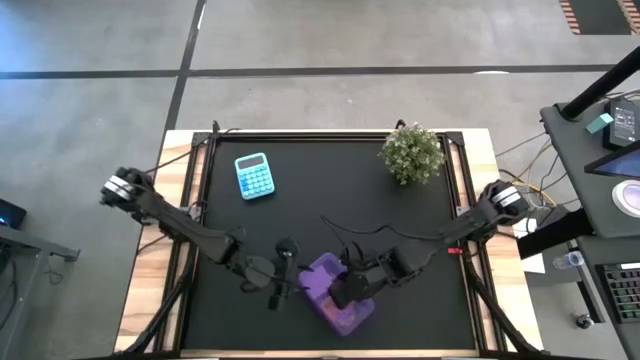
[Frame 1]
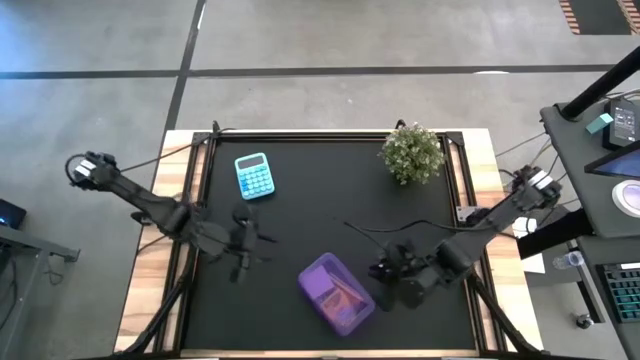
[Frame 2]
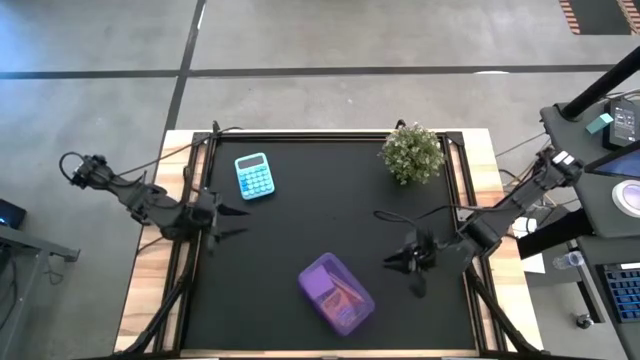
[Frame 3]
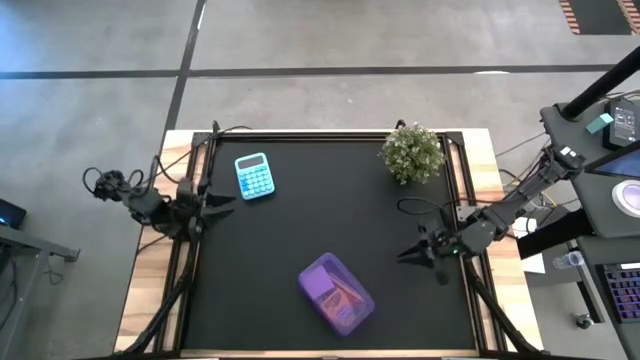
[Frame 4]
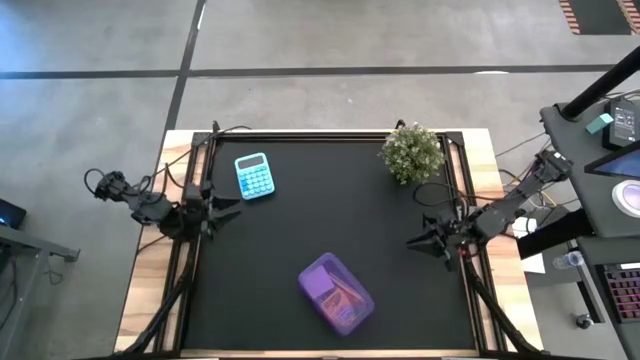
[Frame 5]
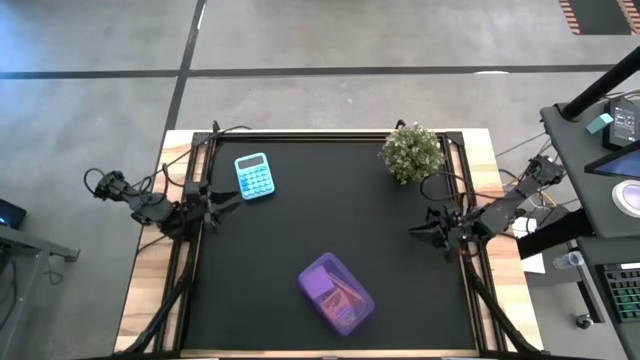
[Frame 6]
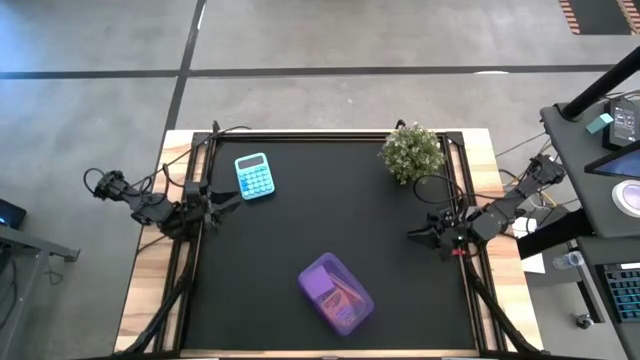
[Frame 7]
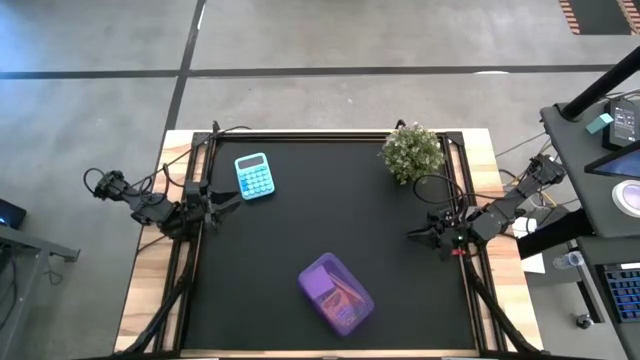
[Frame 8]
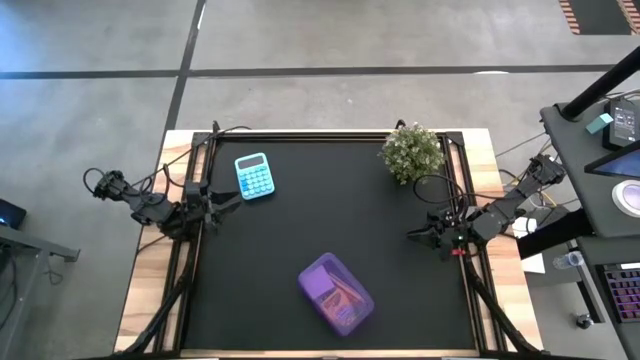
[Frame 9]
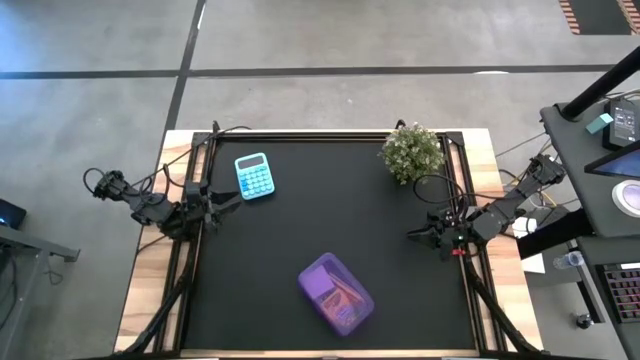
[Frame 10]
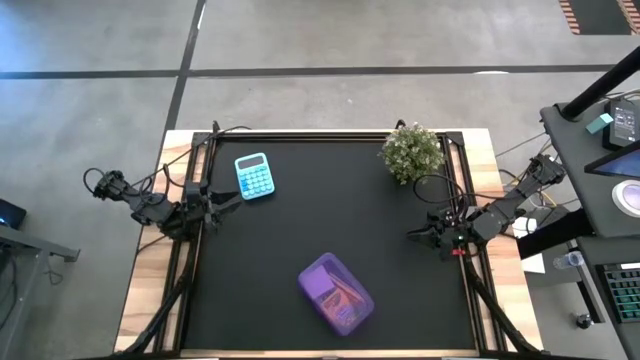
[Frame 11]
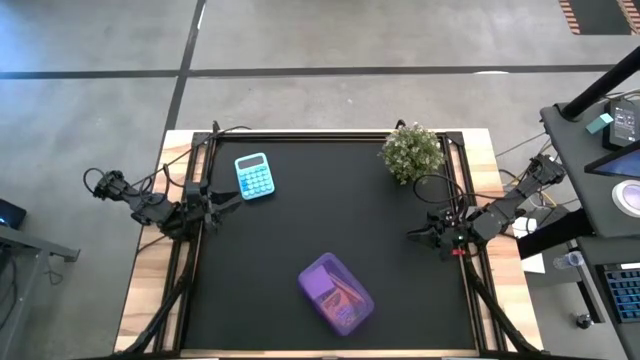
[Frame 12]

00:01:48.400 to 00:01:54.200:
Task: Pack school essentials
Return to Home Position

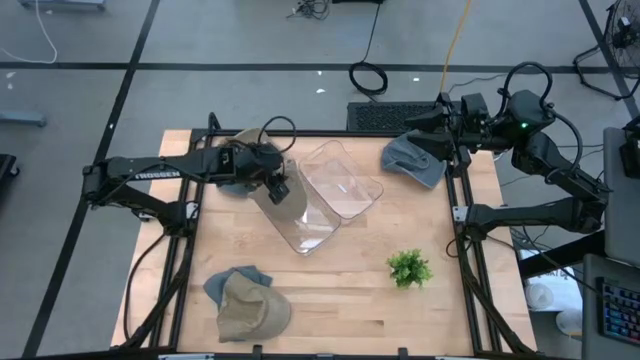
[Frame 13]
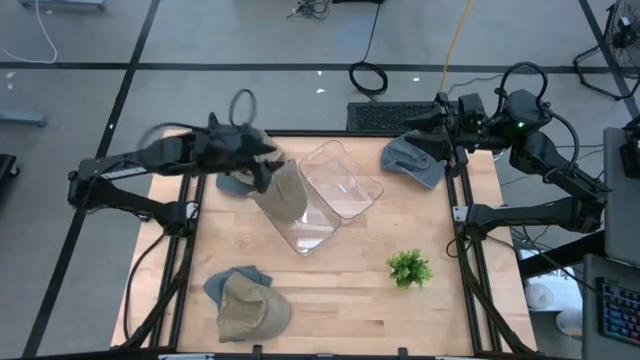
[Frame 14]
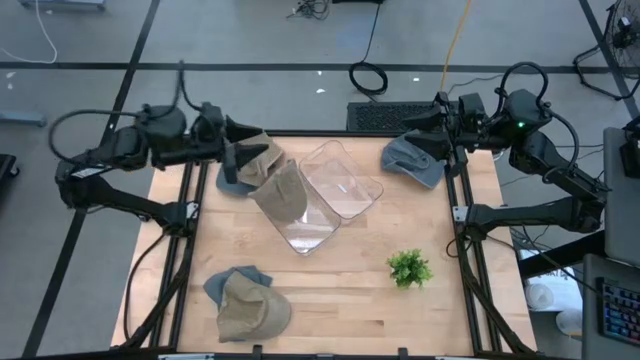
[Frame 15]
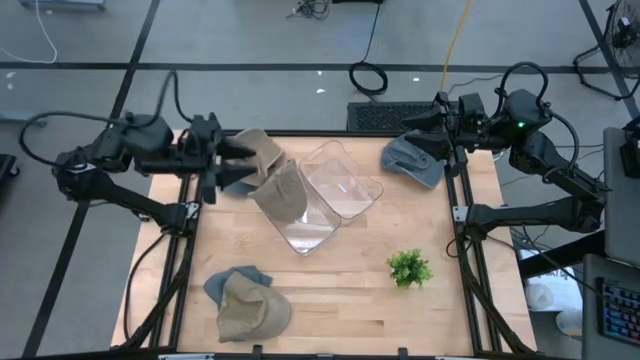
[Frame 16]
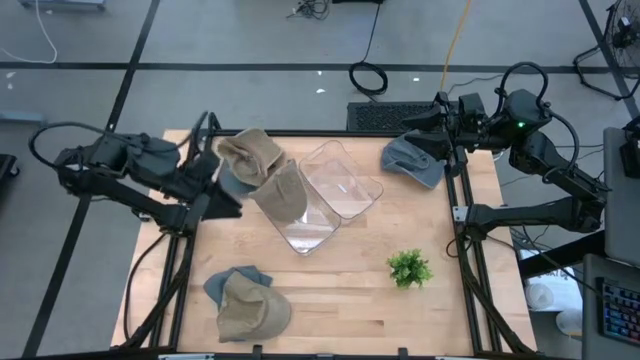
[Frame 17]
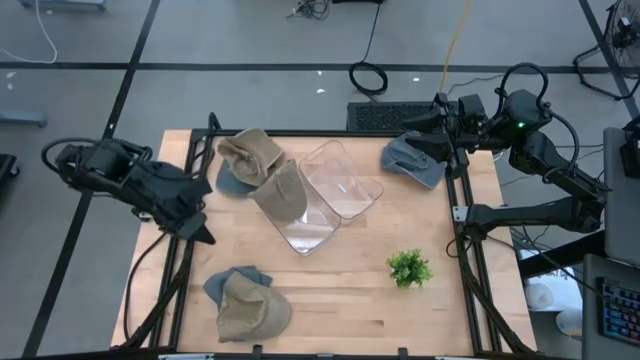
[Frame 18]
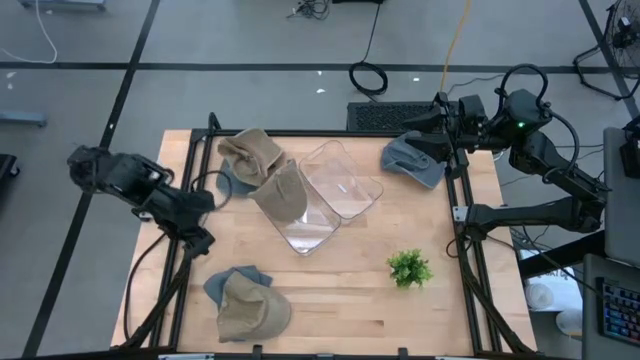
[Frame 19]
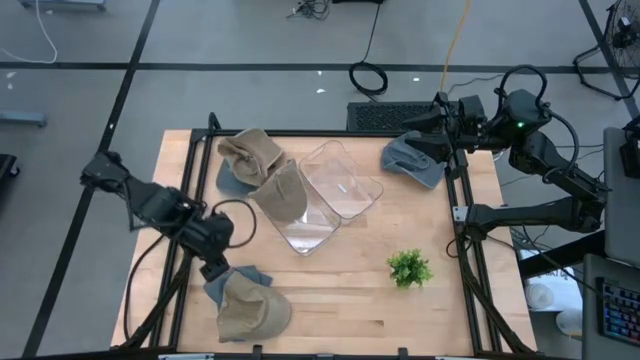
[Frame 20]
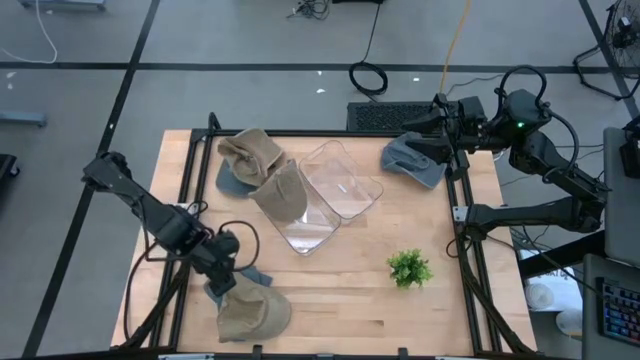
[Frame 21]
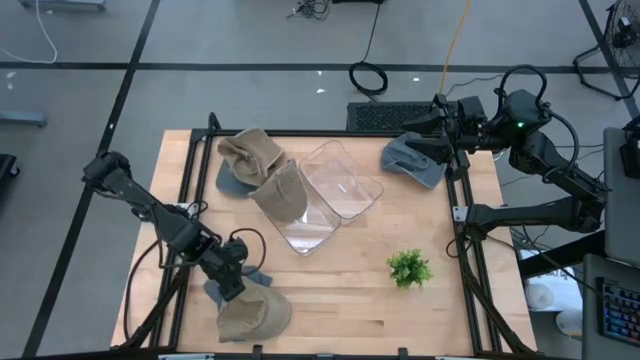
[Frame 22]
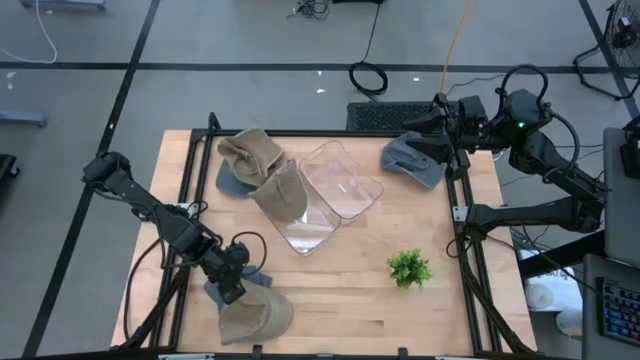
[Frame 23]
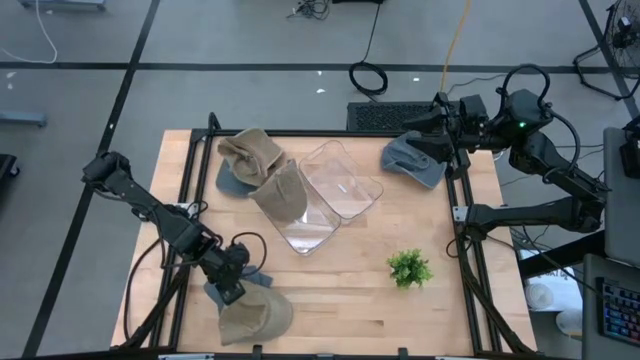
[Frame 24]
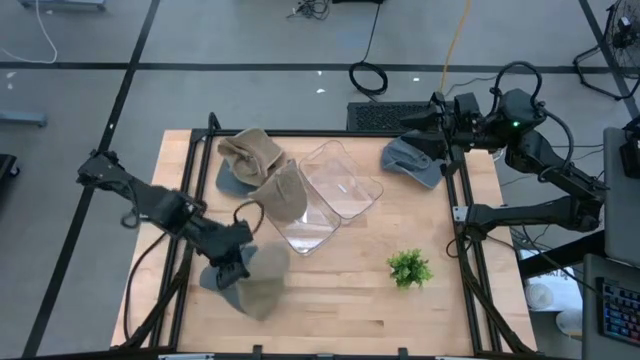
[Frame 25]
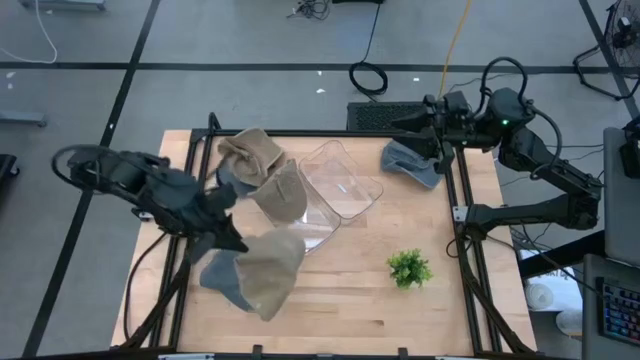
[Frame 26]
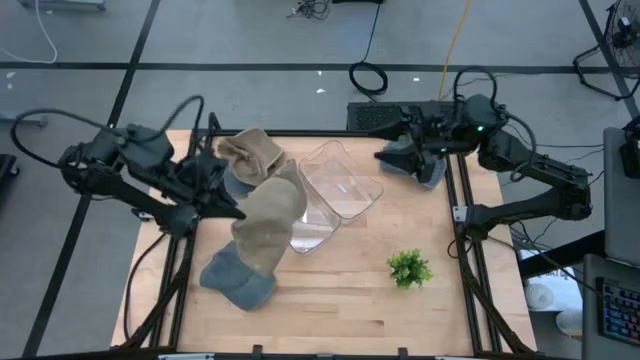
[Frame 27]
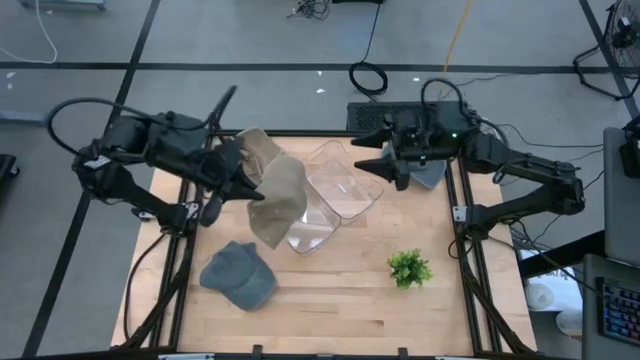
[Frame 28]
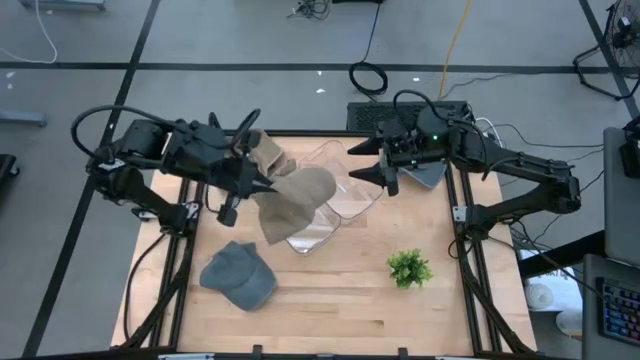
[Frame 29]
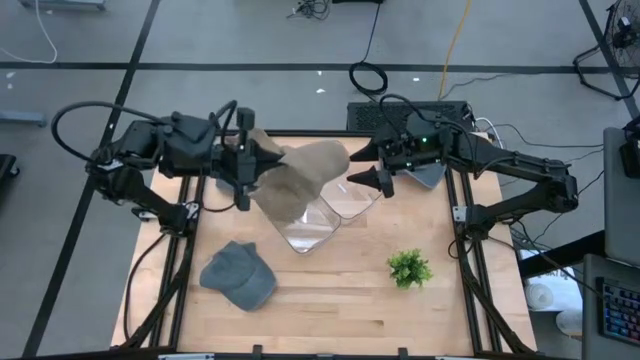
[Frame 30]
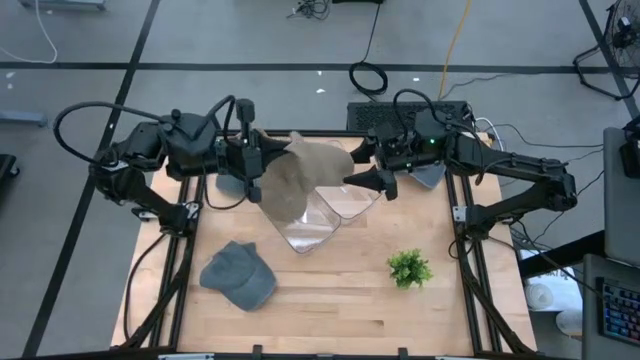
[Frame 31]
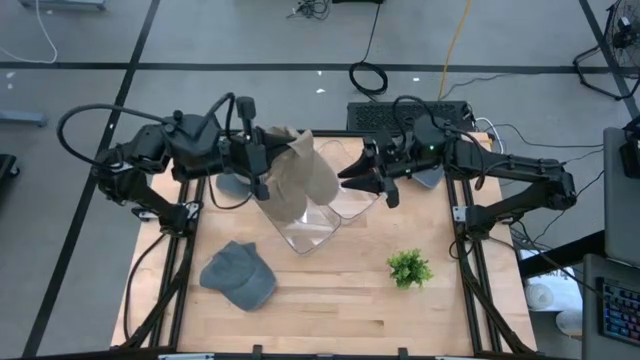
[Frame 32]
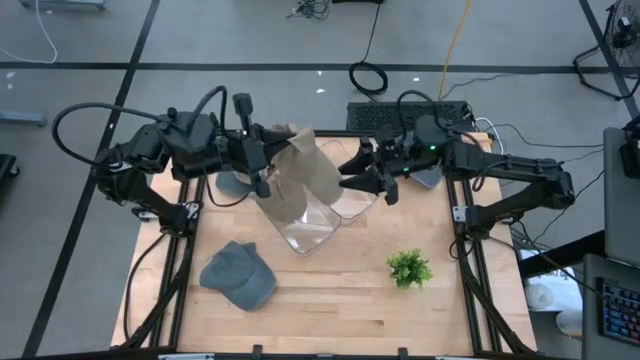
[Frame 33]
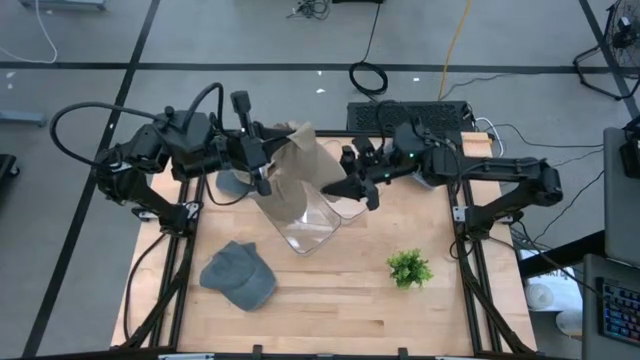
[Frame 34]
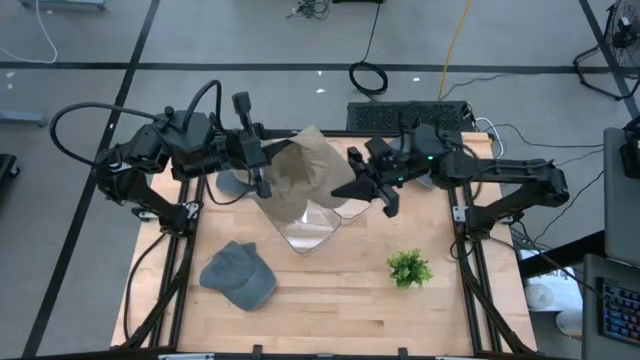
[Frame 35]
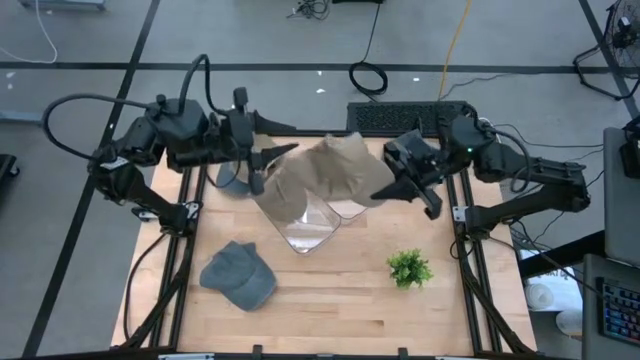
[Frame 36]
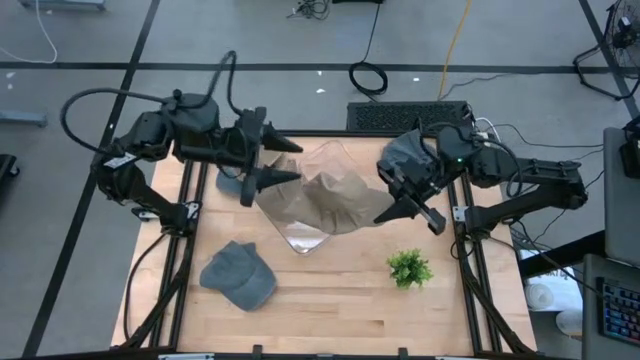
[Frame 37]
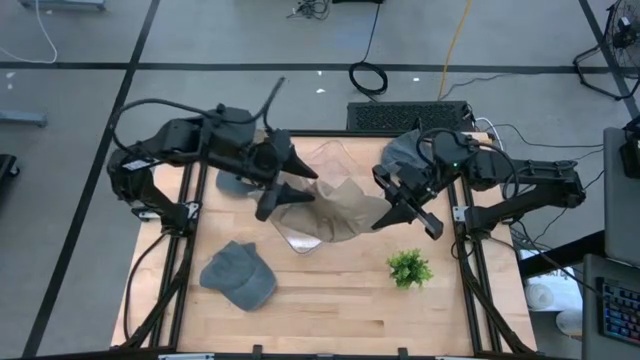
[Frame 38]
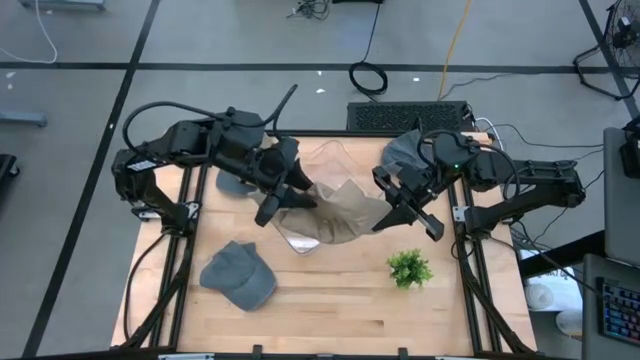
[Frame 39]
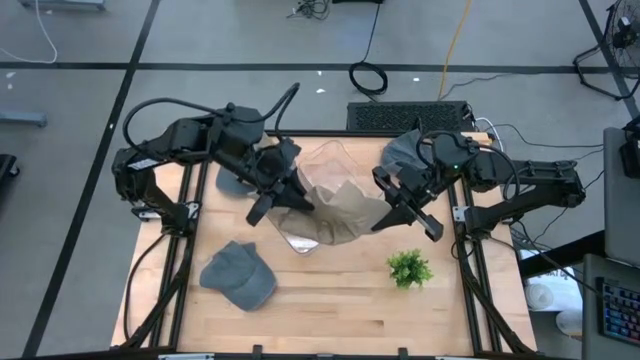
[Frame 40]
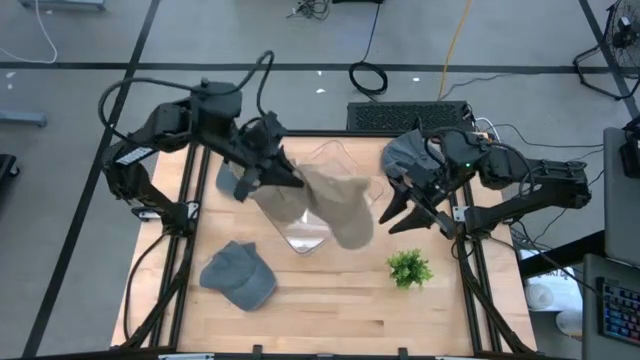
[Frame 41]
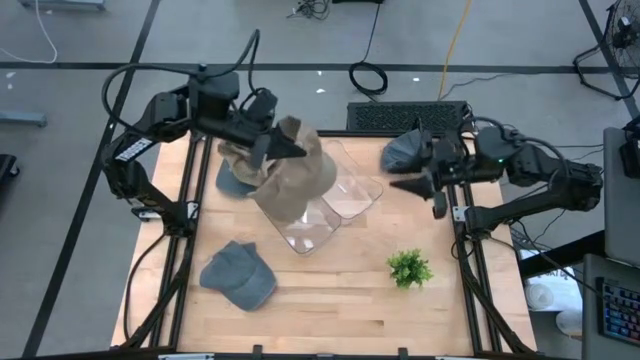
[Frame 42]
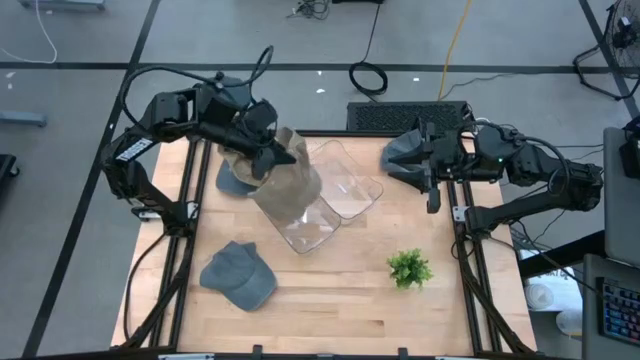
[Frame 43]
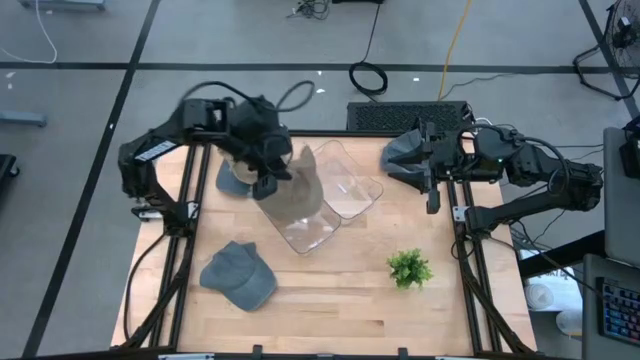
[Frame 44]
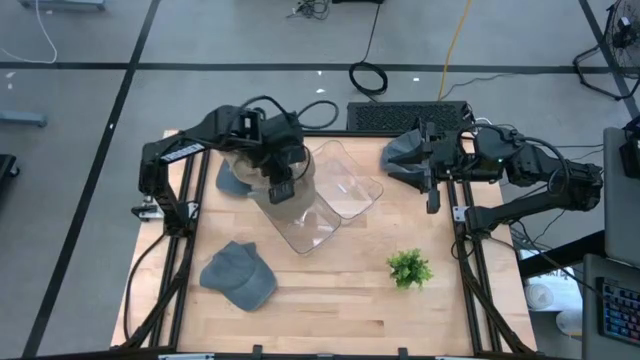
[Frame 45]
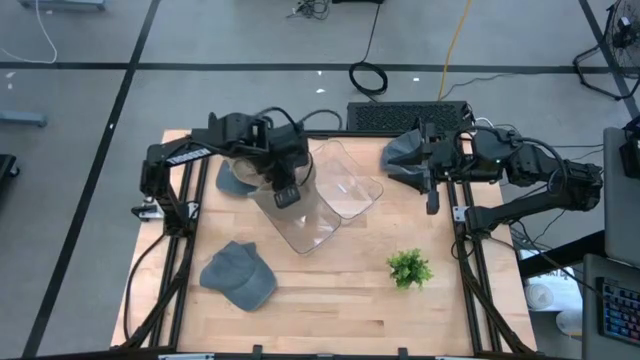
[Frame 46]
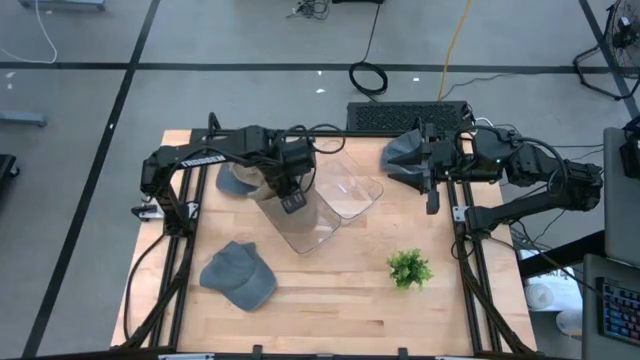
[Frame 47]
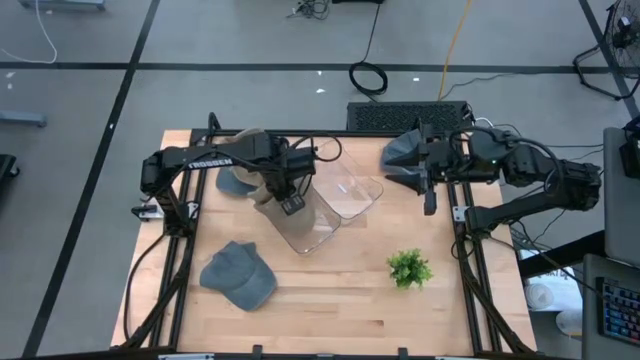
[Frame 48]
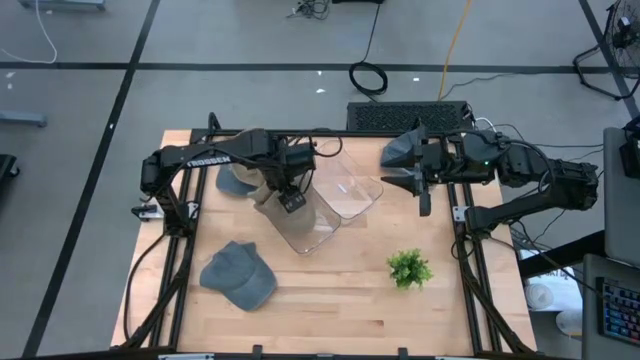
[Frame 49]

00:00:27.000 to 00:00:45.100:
Task: Pick & Place hat
Put the bottom brown cap into the left transparent bin
